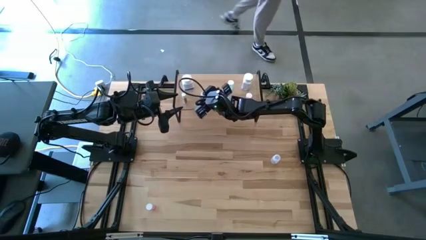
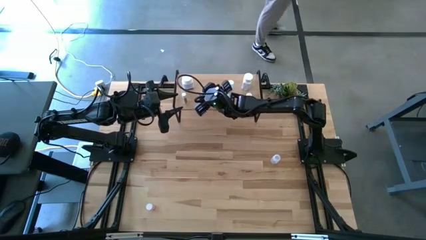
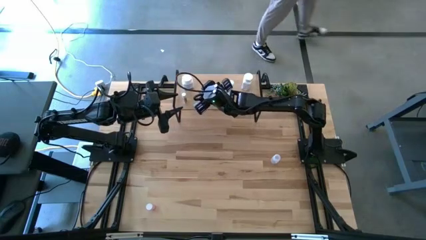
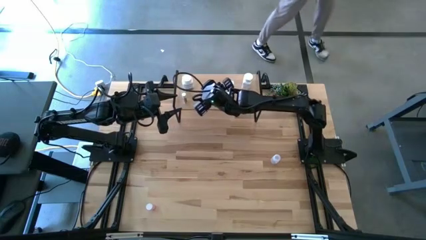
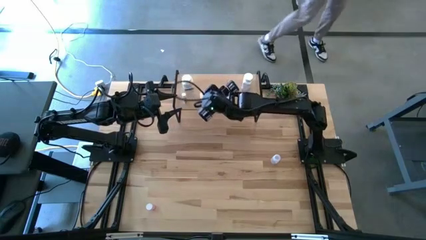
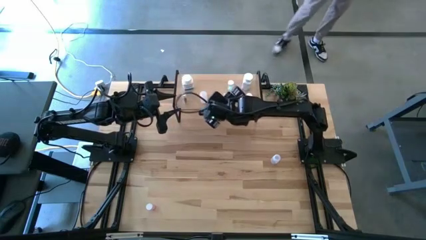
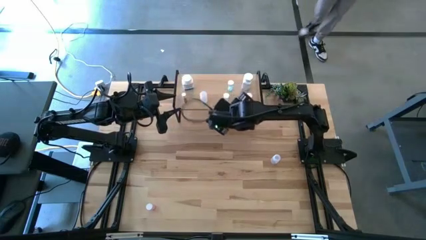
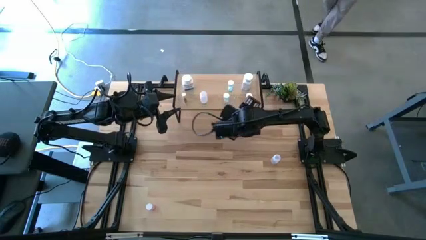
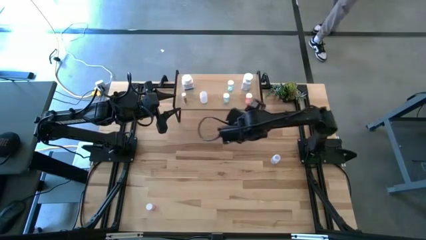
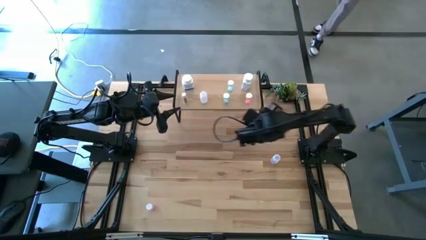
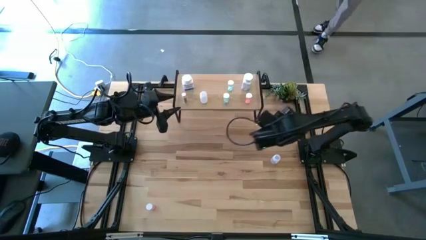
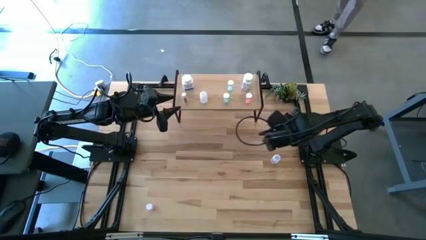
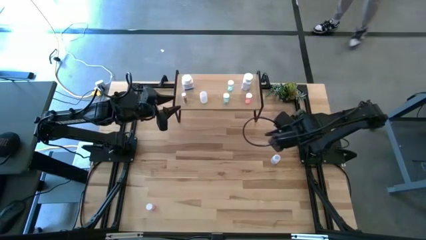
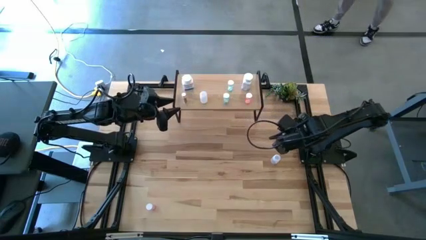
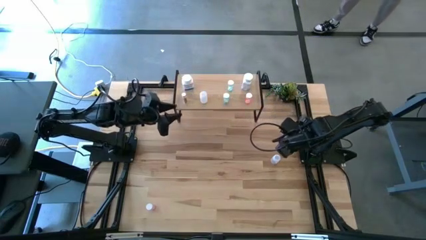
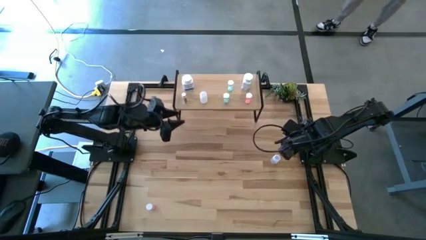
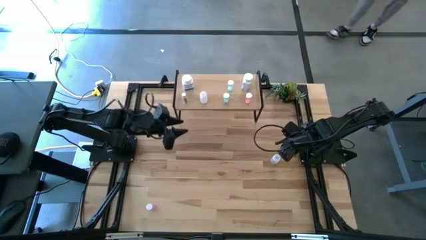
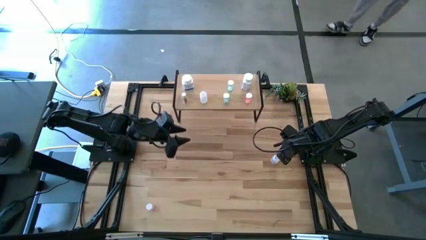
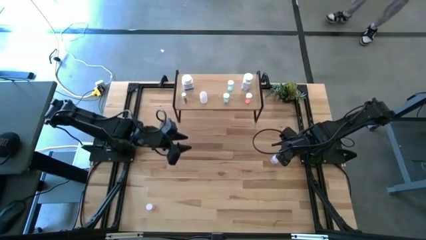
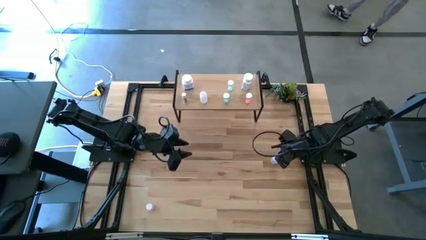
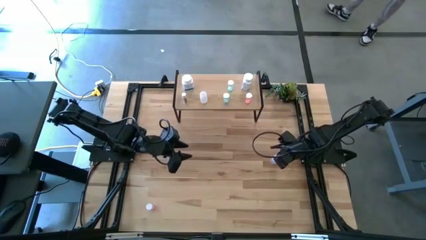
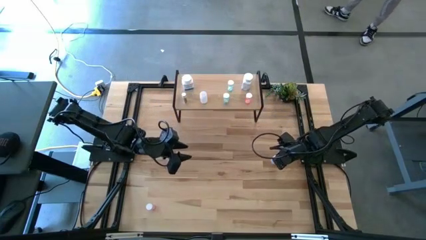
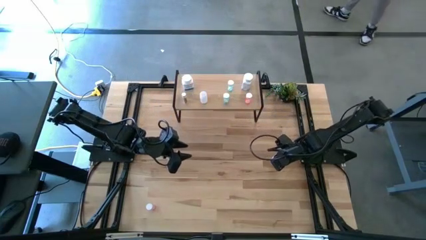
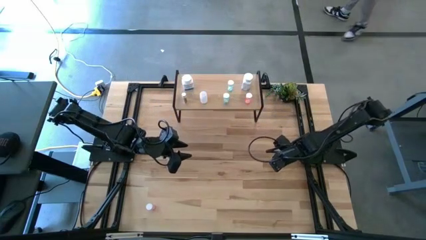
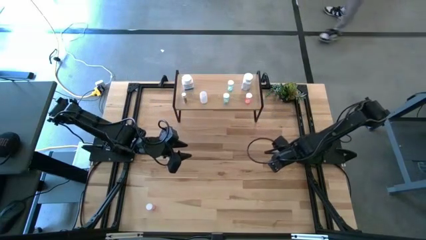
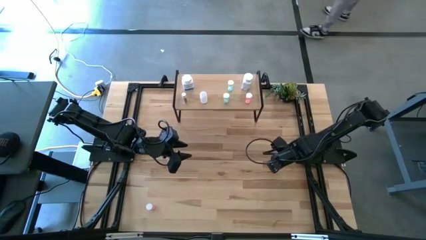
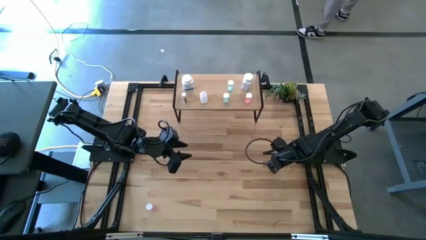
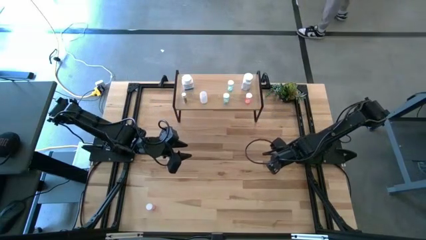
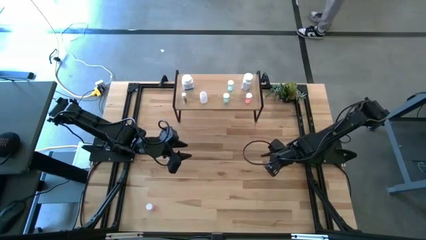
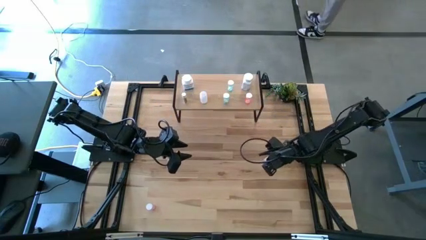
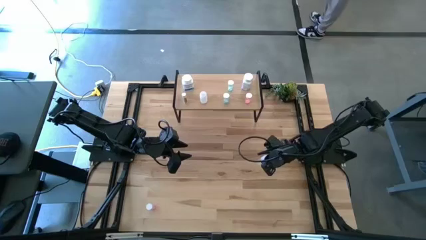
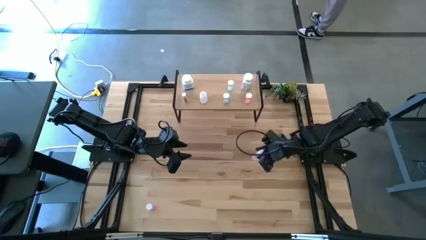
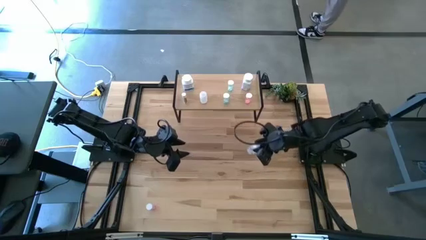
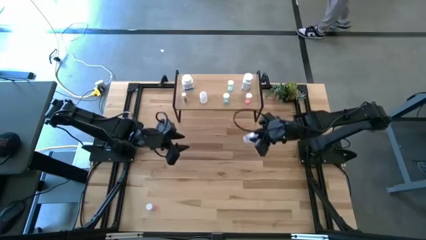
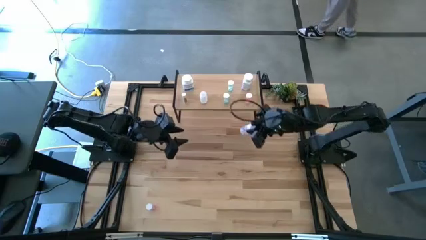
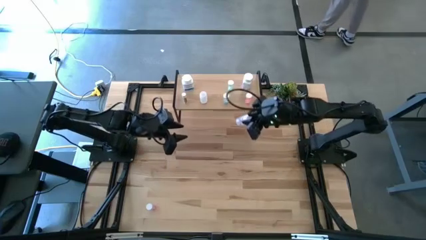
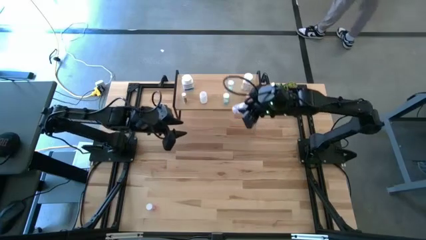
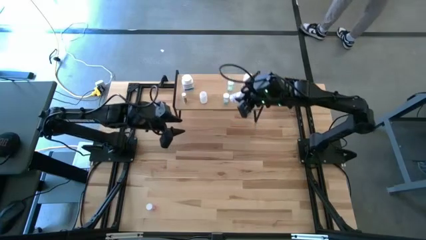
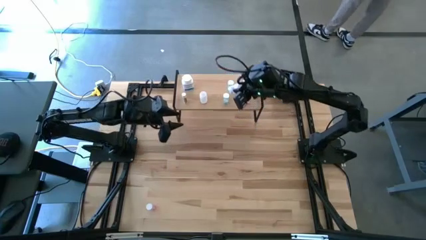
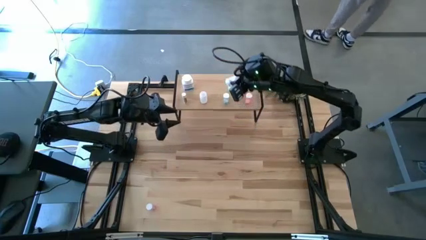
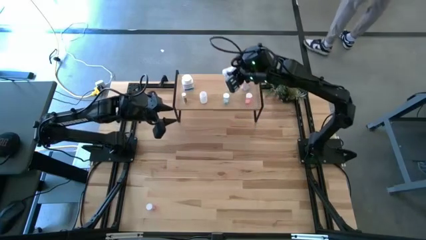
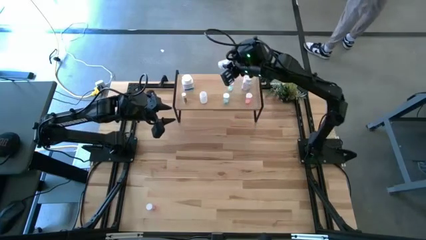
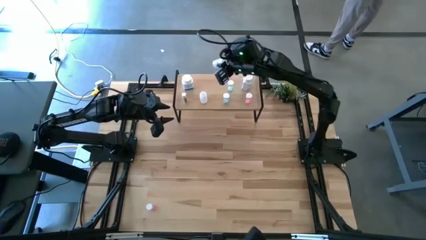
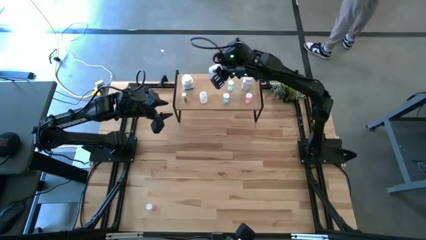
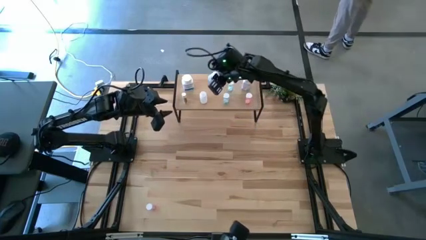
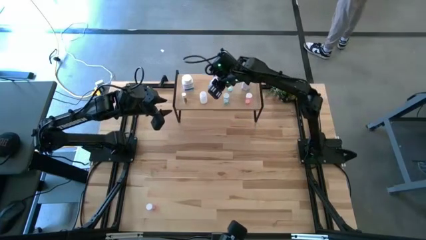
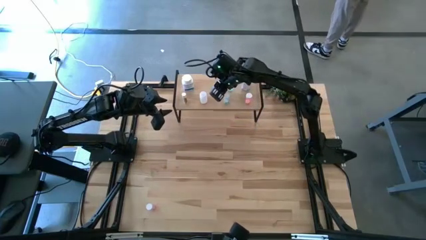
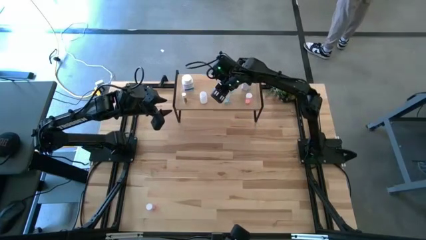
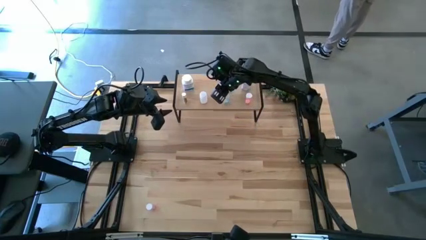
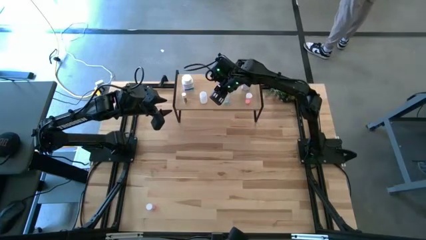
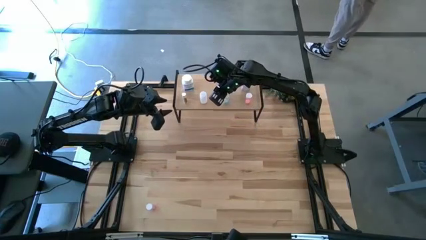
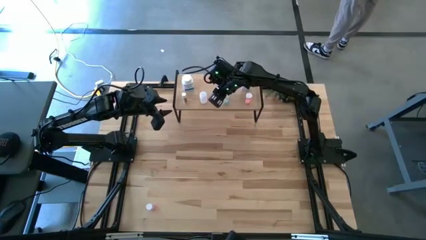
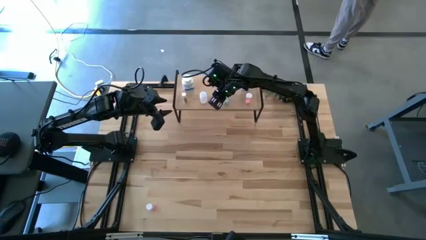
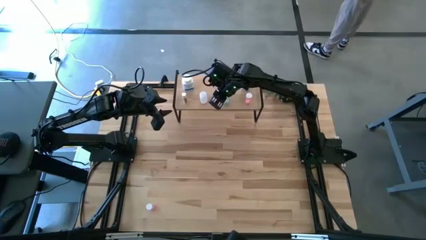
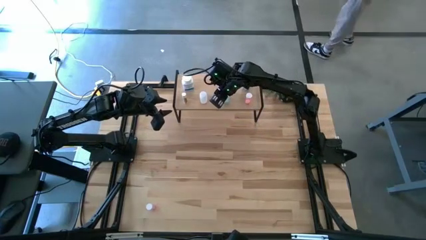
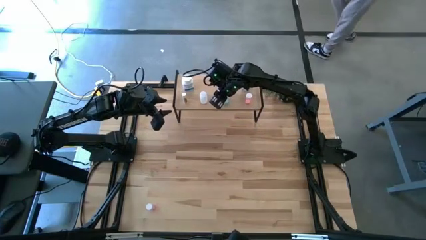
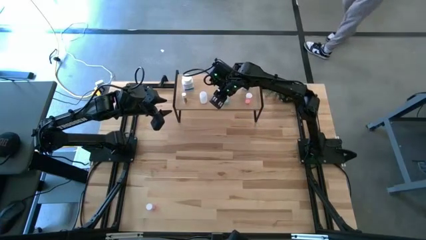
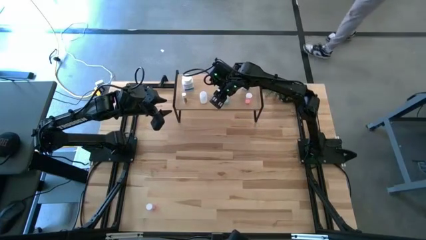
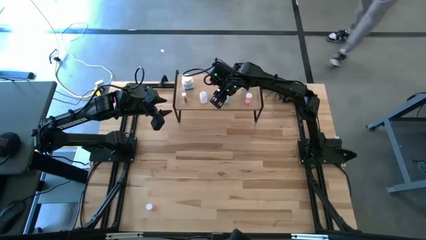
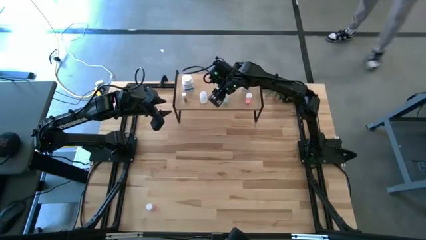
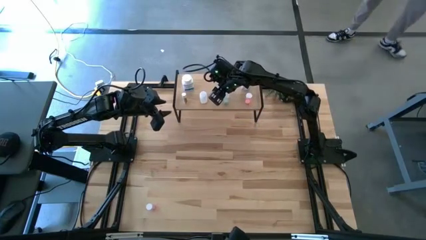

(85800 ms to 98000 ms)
Task: Pick and place medicine bottles onto shelf by color
Put the transparent pill bottle on the shelf
